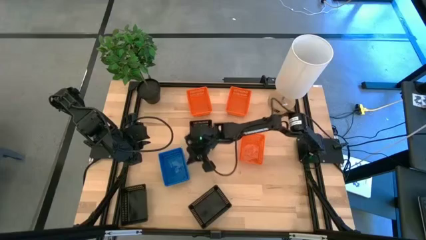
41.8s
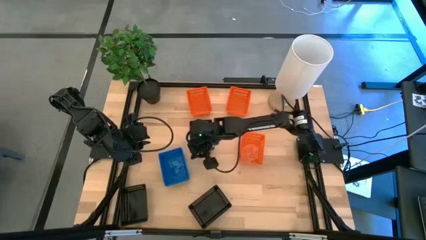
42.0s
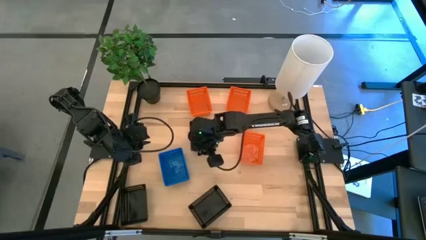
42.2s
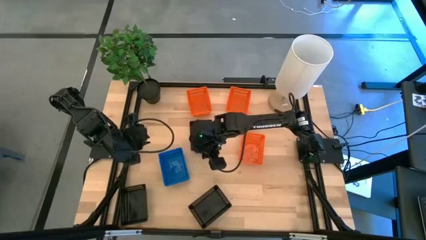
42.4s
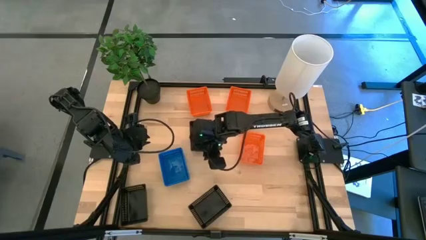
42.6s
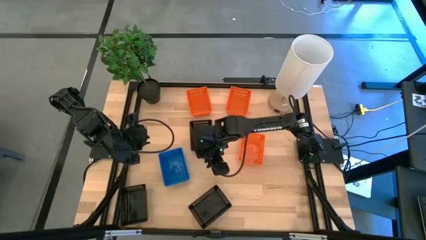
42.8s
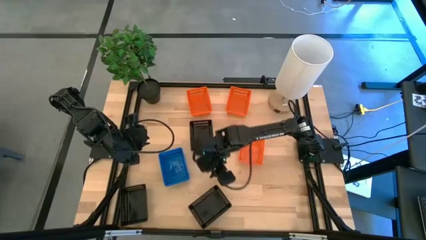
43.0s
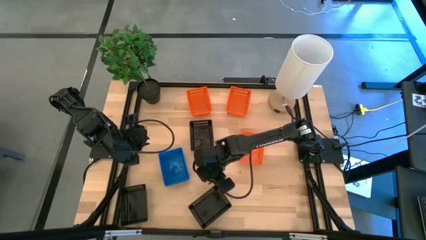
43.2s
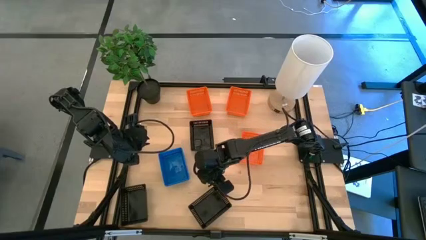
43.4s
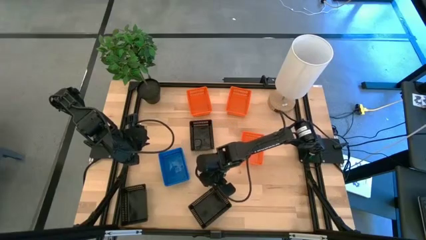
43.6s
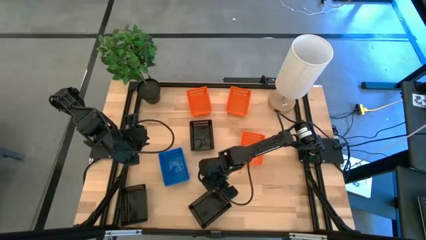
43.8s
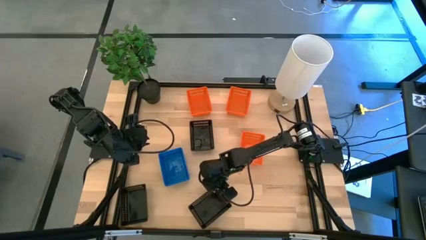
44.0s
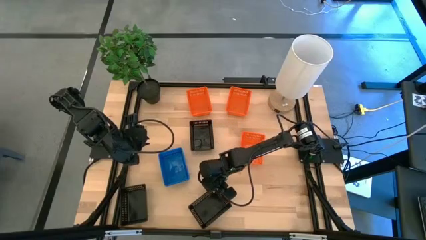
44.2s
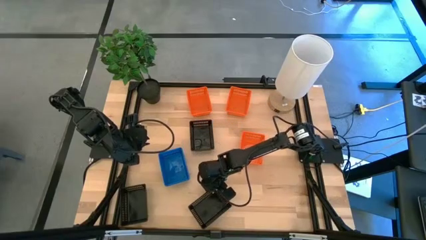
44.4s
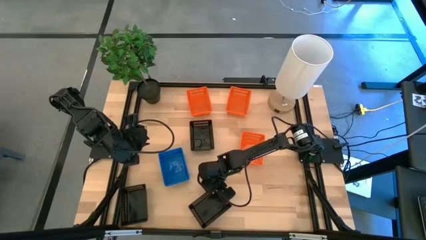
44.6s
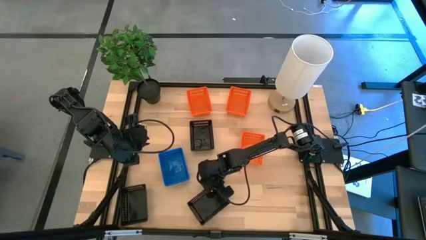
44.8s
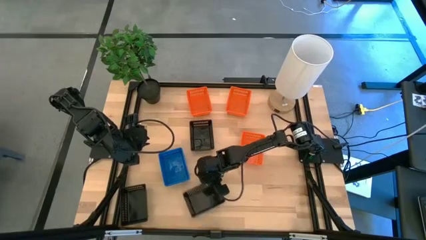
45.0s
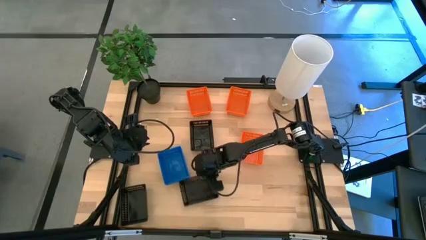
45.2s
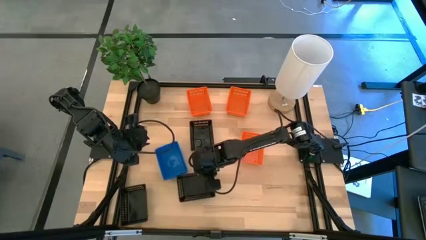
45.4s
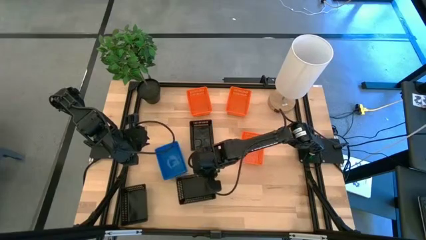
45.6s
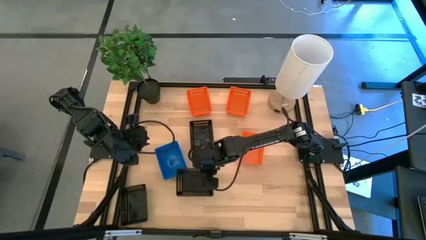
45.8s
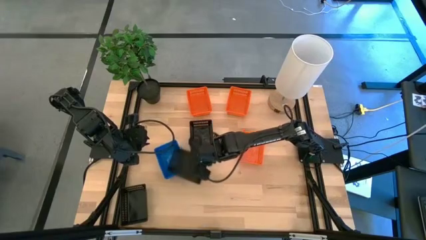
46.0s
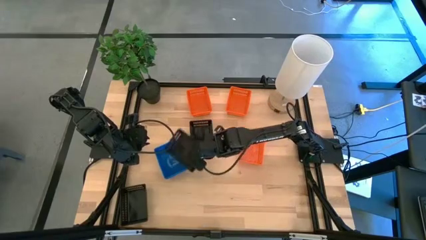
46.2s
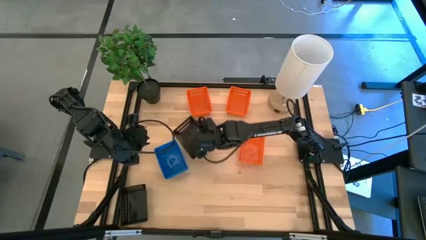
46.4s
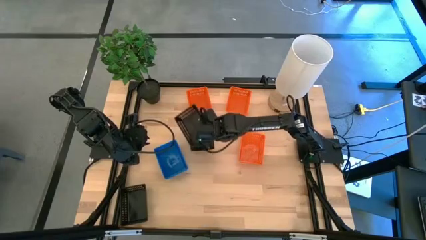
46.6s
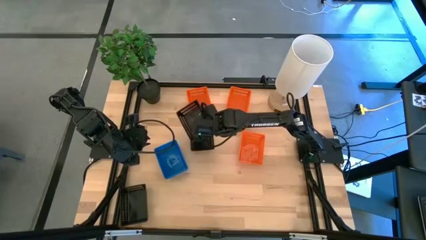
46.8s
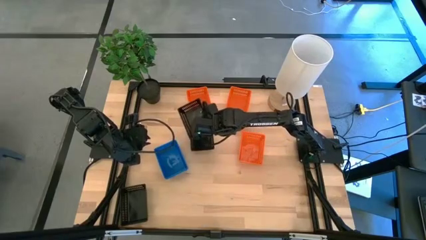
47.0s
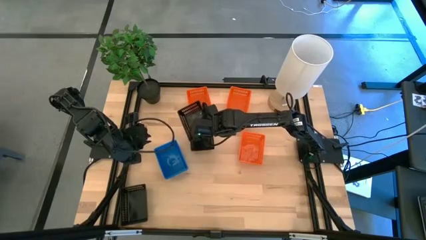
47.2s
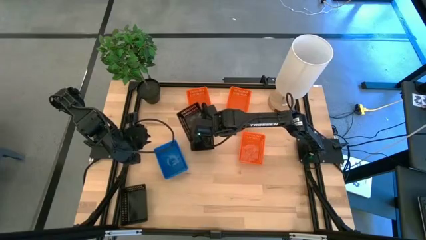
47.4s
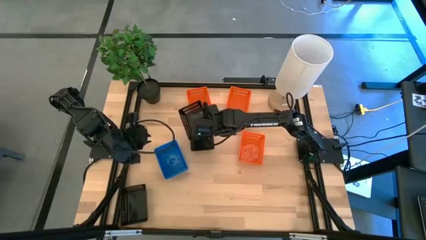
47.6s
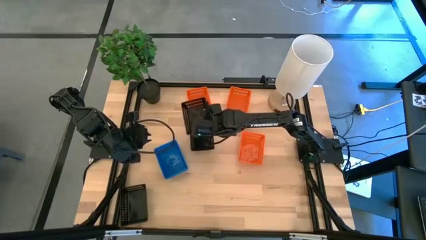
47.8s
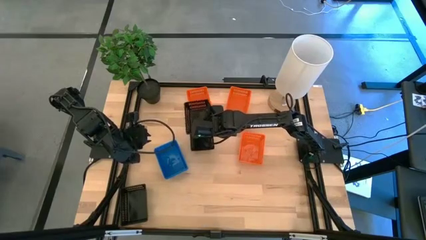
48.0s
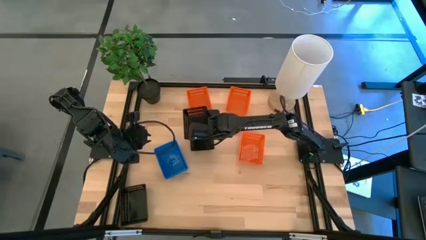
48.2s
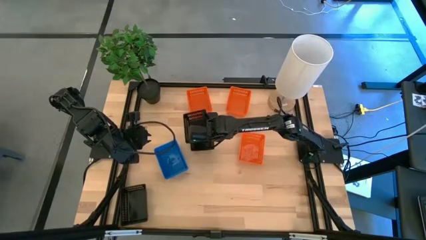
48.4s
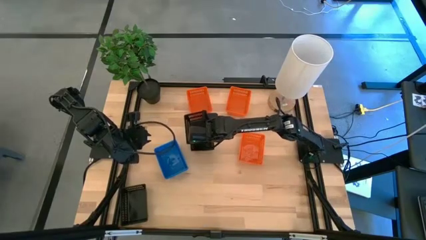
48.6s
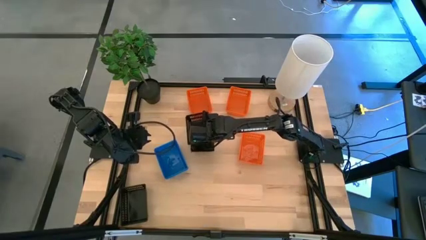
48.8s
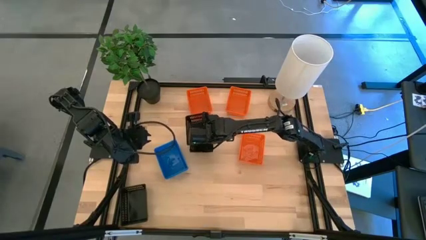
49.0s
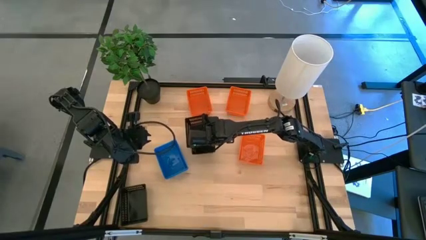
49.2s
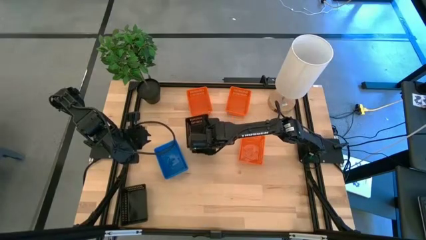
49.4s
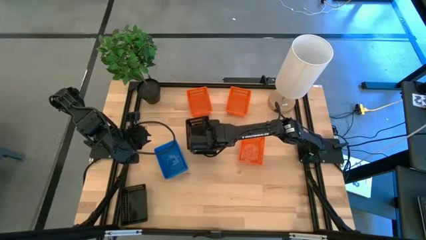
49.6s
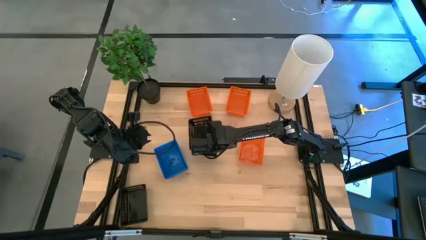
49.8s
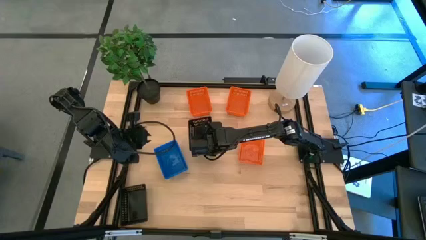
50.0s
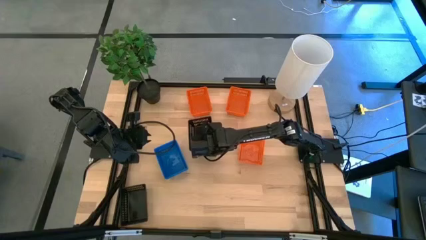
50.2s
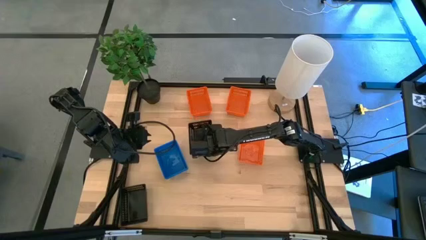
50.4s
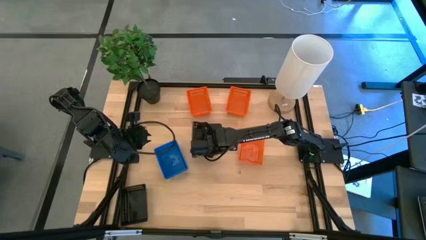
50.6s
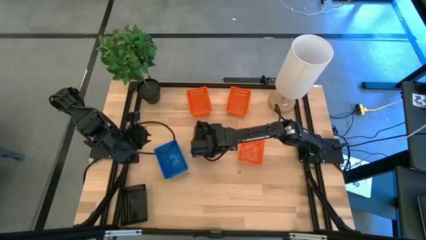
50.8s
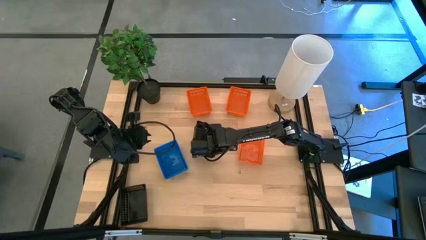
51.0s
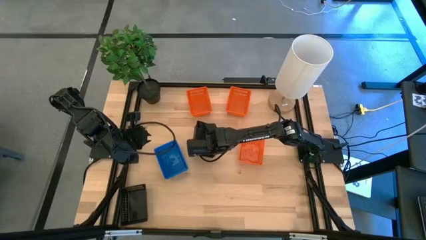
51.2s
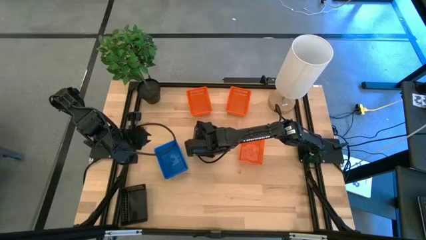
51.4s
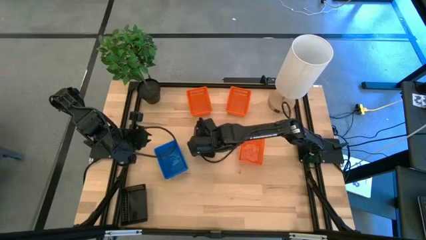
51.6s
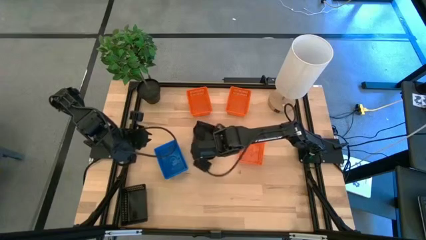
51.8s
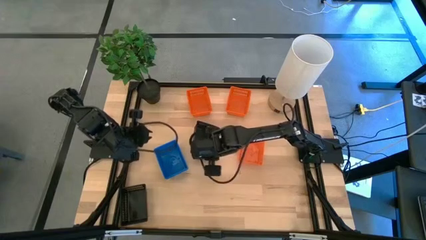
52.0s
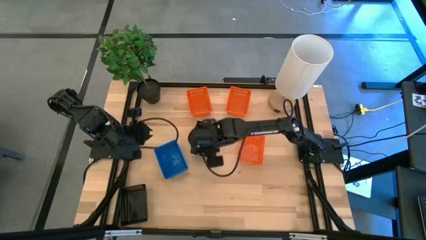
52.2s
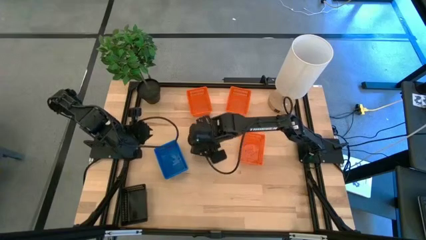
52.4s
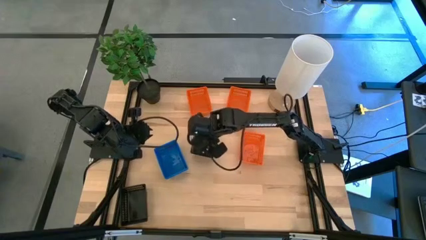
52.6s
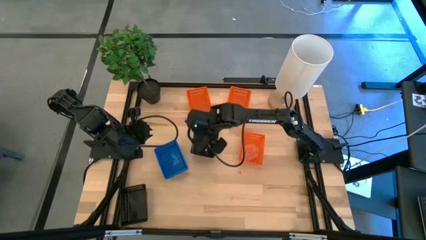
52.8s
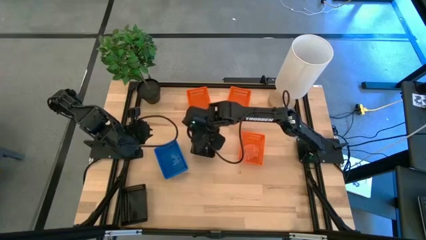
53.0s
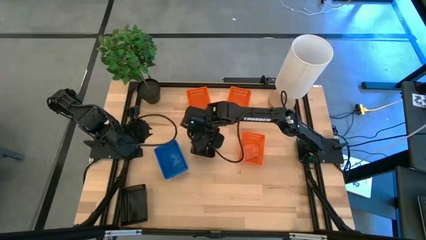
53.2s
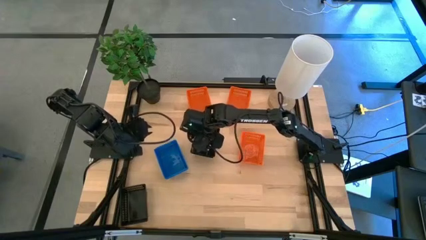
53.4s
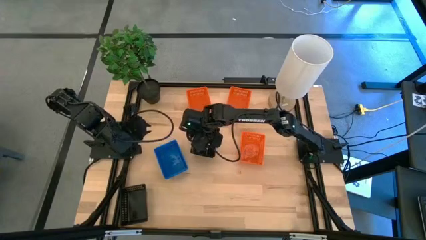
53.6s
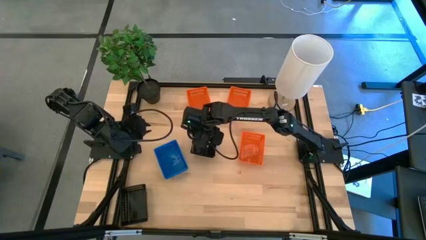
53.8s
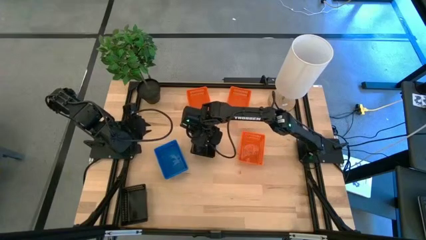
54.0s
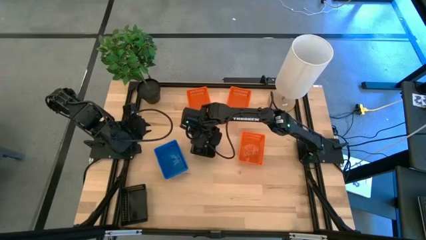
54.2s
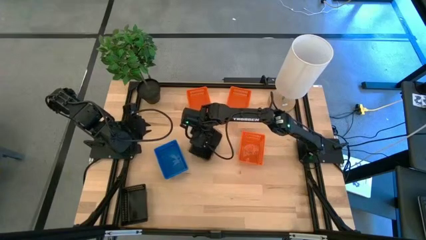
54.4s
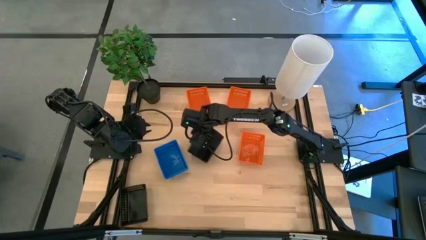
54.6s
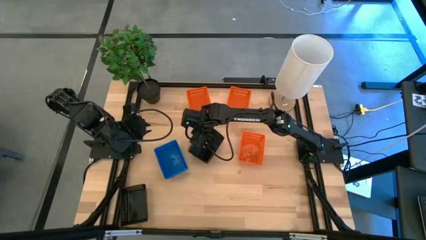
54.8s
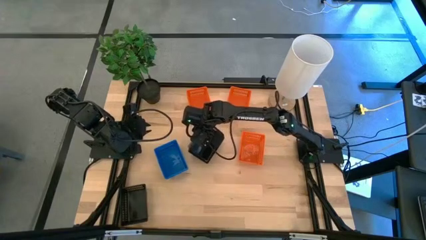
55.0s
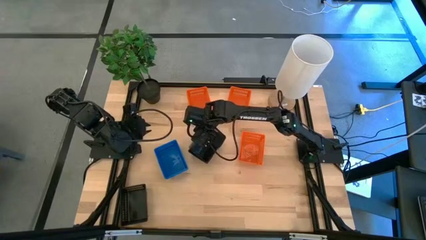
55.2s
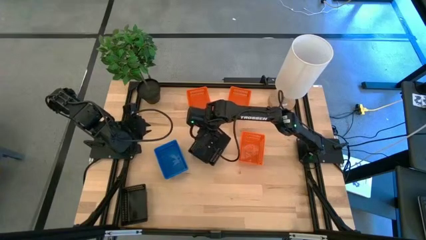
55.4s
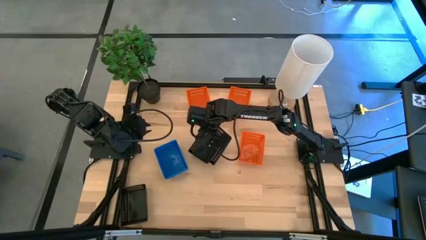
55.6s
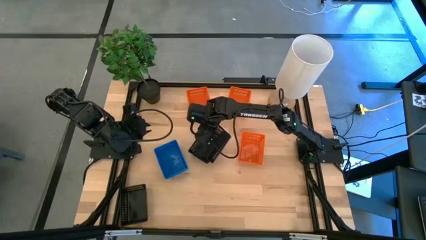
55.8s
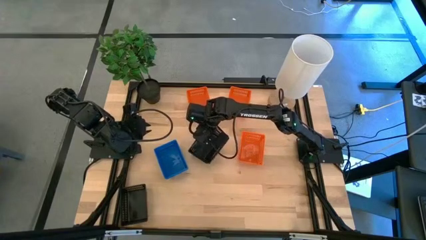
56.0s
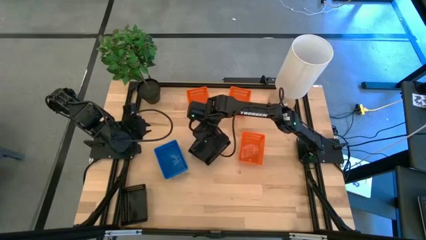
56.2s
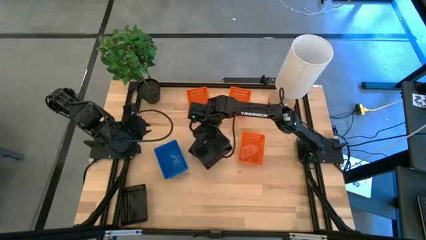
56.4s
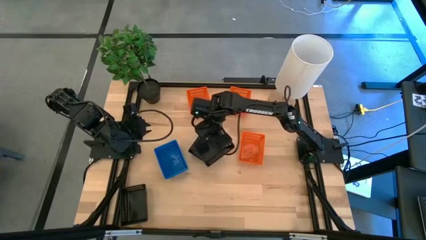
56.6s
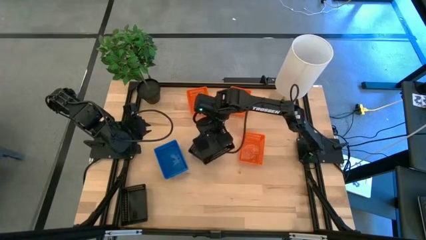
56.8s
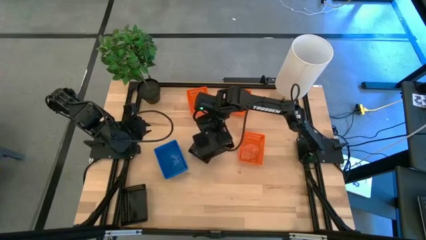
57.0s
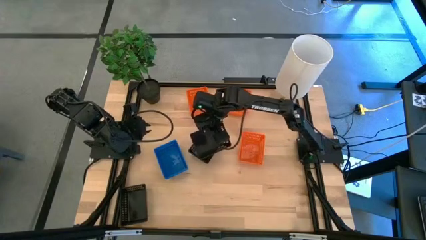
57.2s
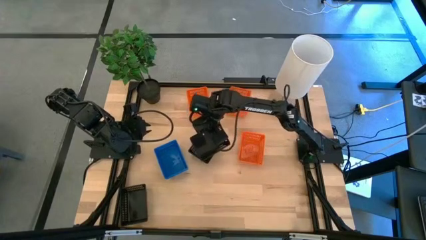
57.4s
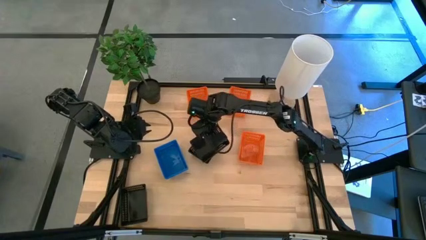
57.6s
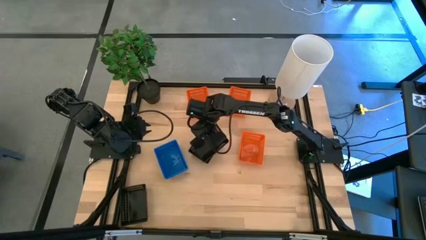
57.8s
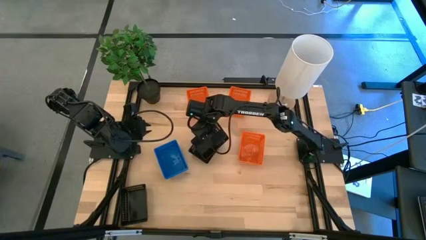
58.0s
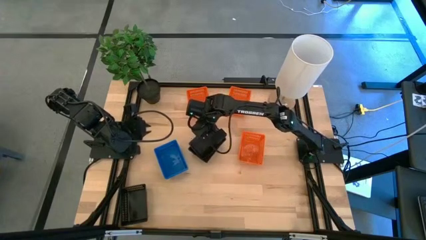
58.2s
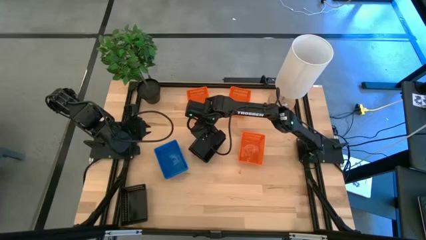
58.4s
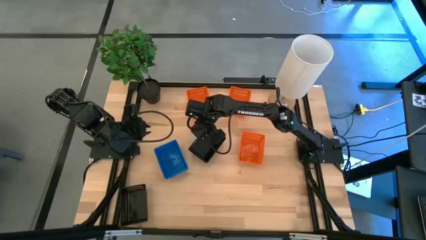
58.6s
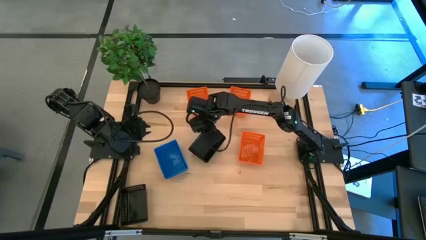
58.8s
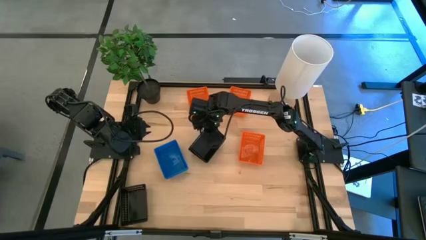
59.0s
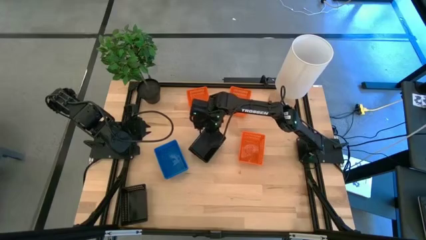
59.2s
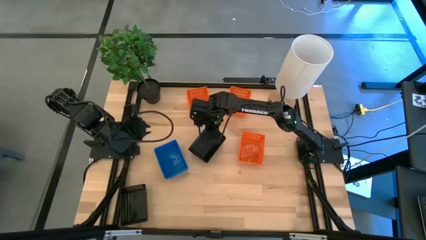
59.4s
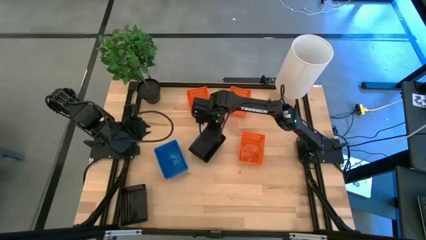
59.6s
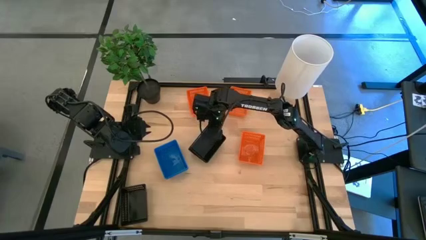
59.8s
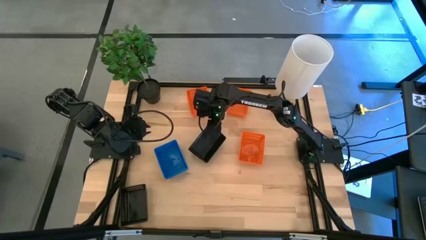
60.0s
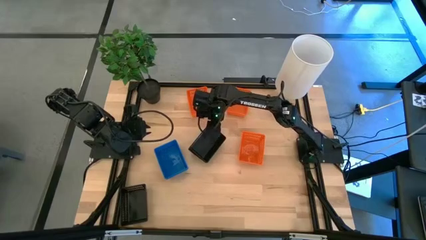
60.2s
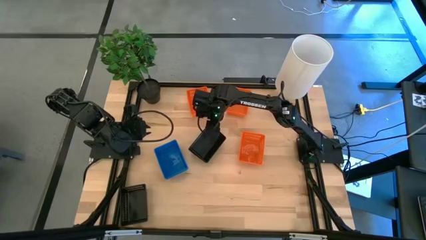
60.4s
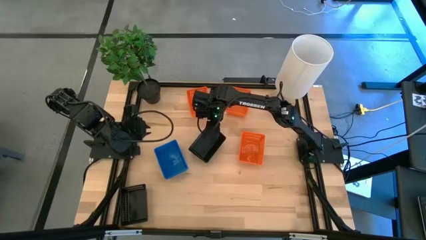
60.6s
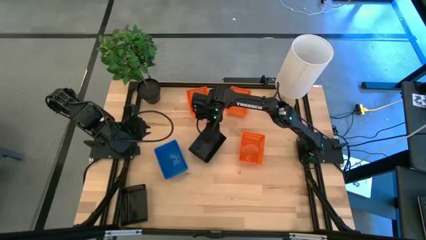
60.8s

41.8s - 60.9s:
Stack the bottom right black bin on top of the top right black bin
